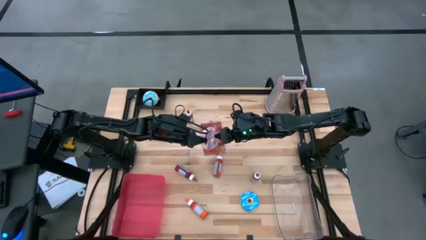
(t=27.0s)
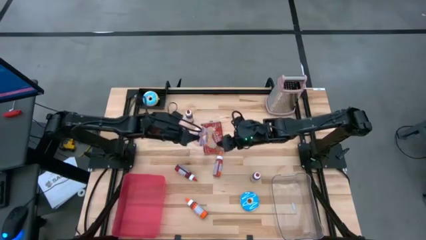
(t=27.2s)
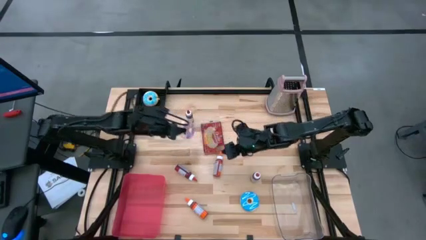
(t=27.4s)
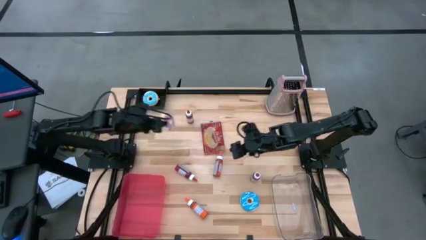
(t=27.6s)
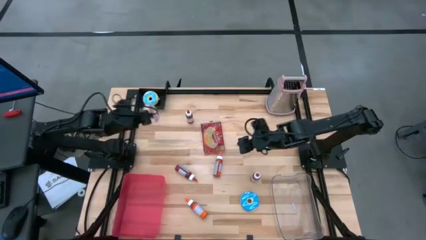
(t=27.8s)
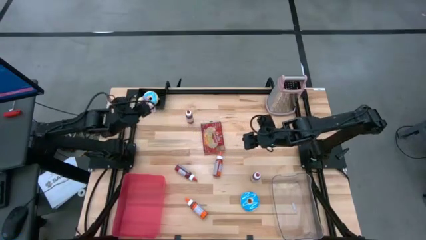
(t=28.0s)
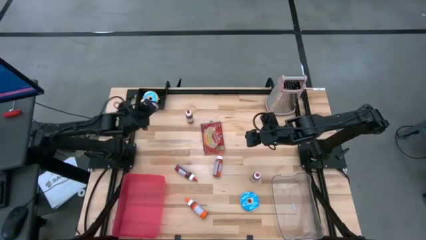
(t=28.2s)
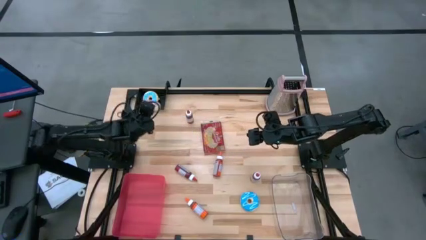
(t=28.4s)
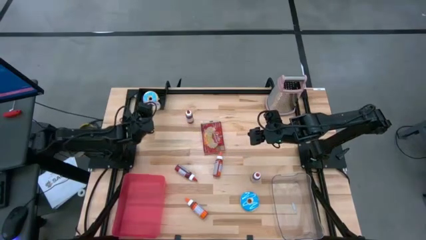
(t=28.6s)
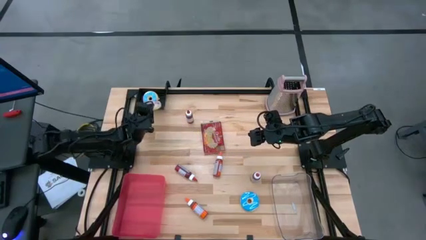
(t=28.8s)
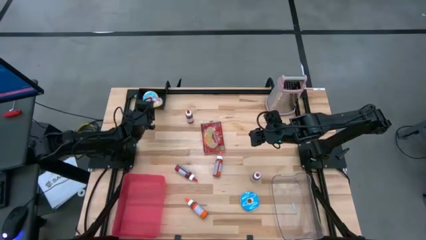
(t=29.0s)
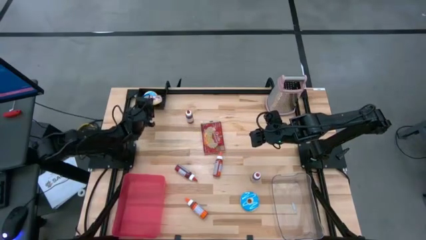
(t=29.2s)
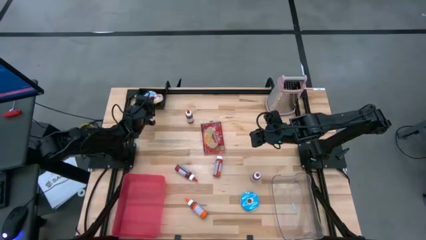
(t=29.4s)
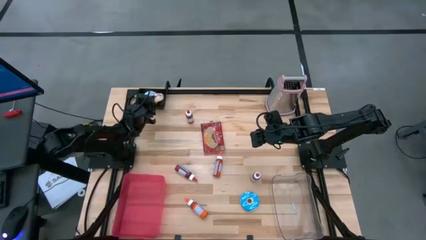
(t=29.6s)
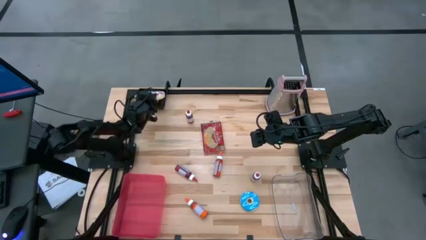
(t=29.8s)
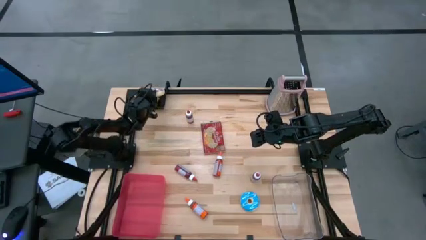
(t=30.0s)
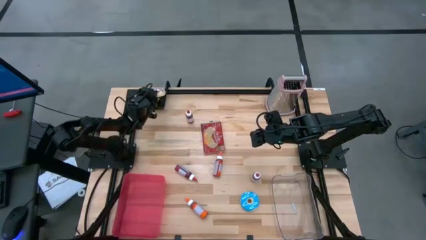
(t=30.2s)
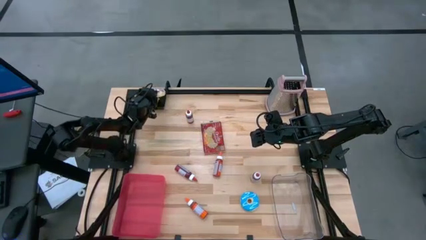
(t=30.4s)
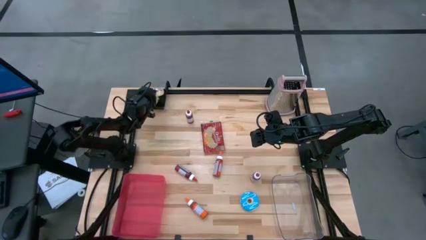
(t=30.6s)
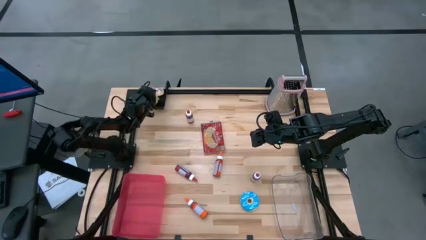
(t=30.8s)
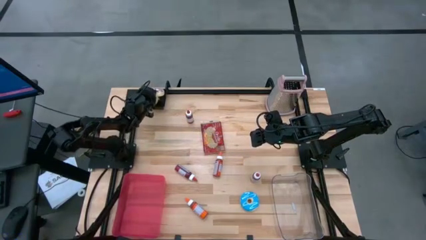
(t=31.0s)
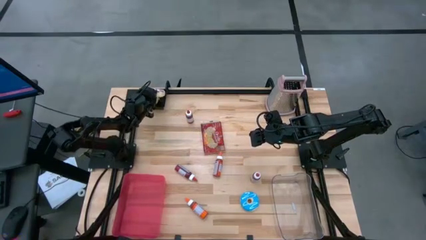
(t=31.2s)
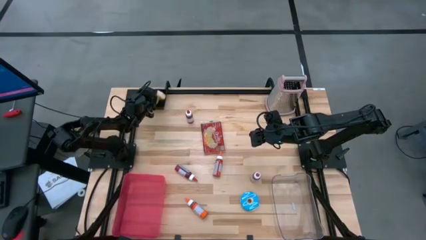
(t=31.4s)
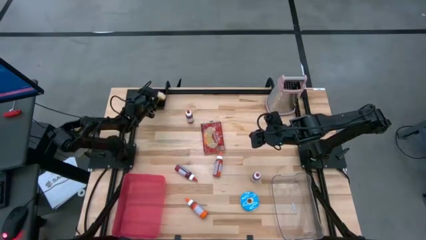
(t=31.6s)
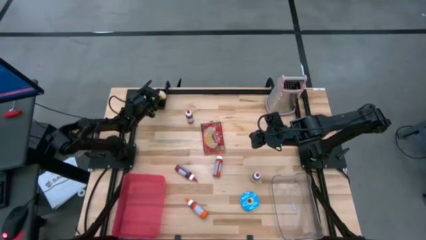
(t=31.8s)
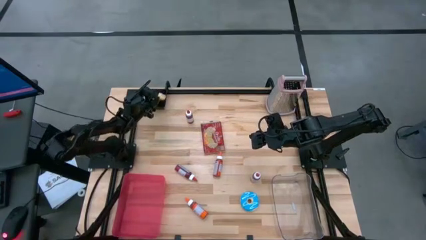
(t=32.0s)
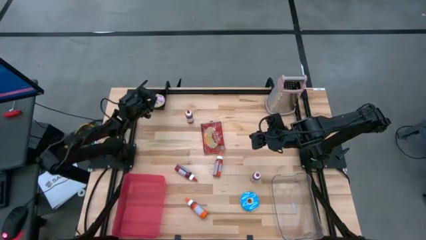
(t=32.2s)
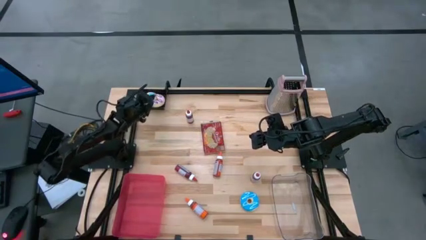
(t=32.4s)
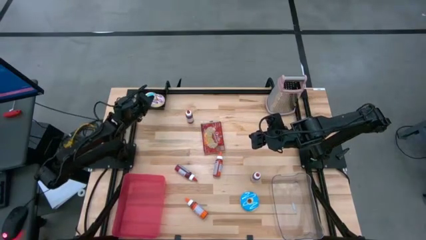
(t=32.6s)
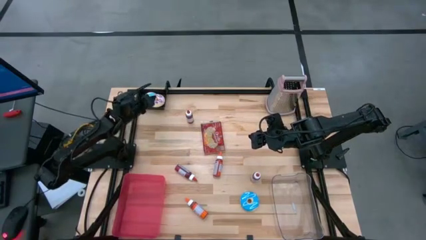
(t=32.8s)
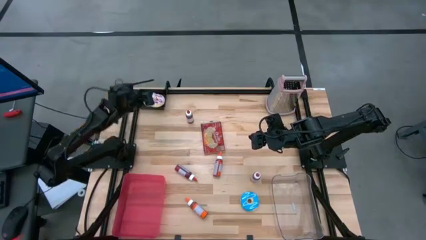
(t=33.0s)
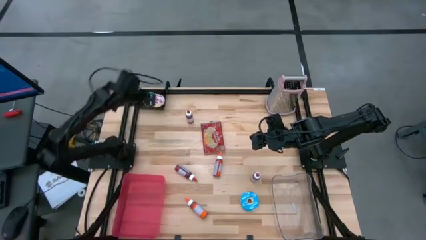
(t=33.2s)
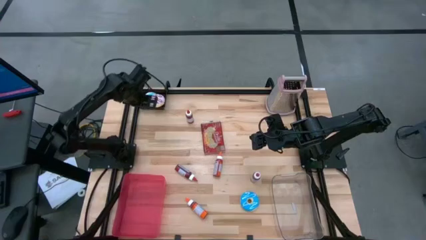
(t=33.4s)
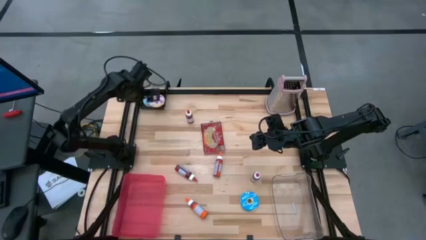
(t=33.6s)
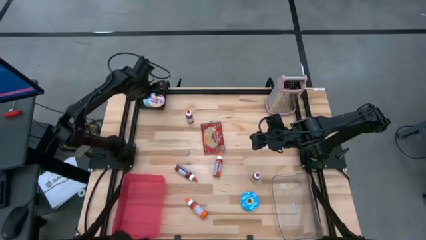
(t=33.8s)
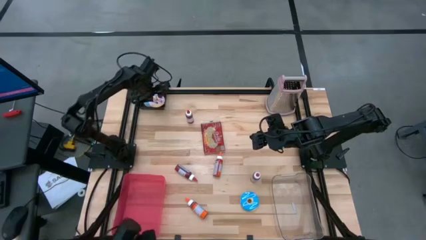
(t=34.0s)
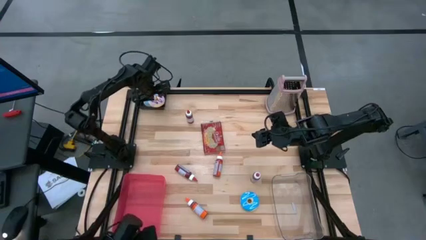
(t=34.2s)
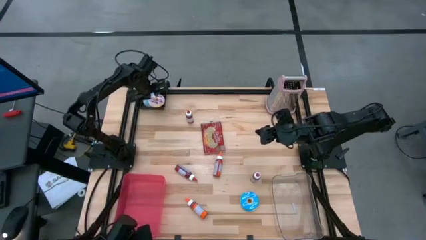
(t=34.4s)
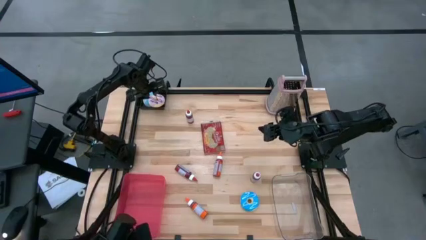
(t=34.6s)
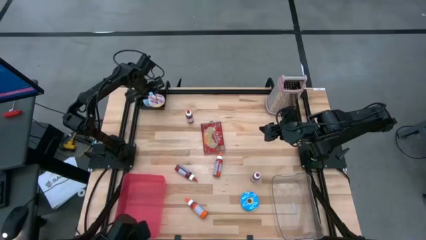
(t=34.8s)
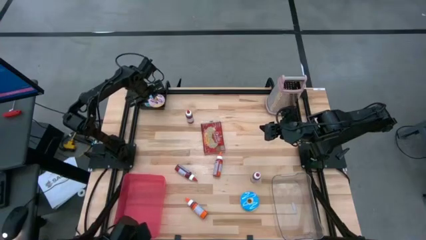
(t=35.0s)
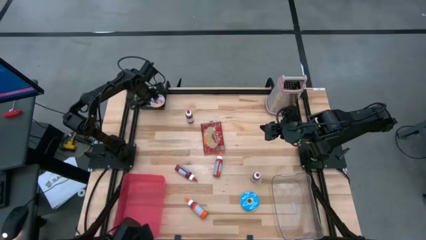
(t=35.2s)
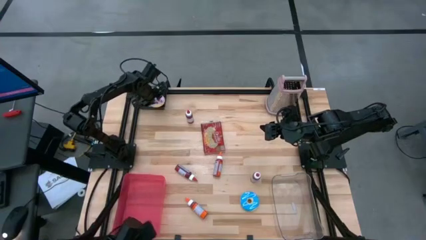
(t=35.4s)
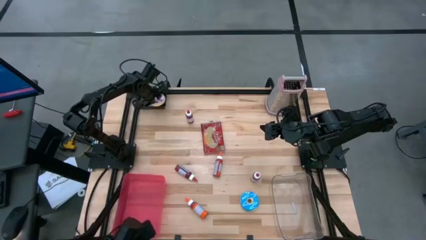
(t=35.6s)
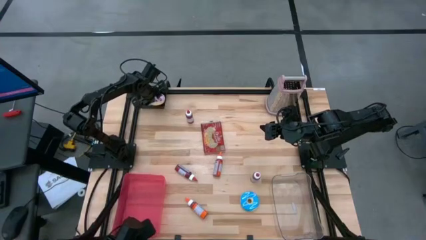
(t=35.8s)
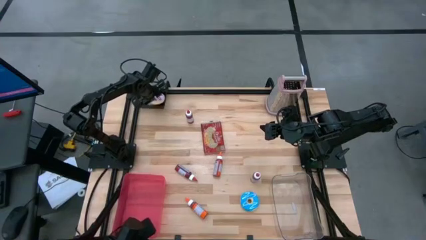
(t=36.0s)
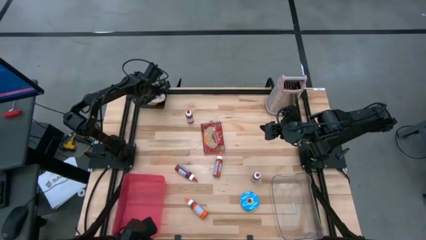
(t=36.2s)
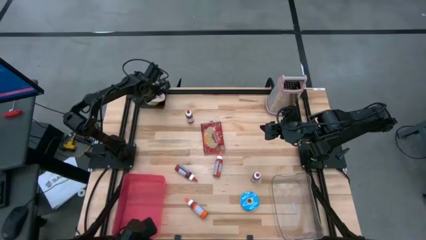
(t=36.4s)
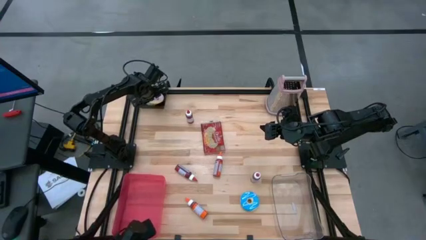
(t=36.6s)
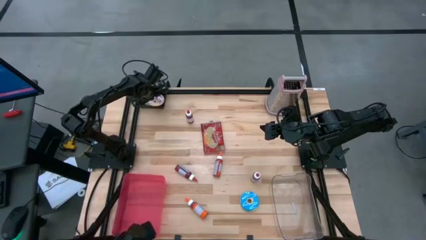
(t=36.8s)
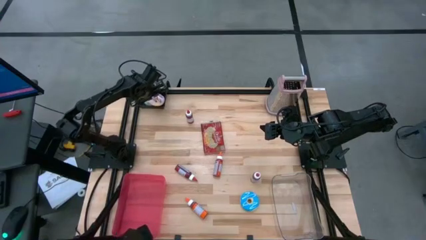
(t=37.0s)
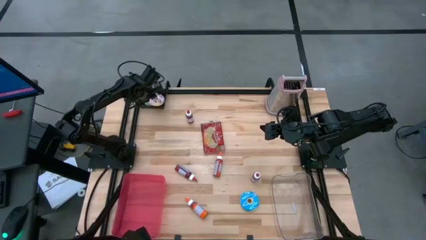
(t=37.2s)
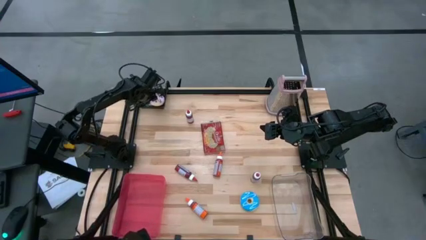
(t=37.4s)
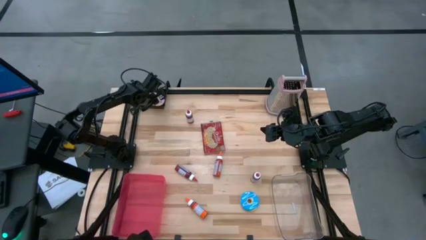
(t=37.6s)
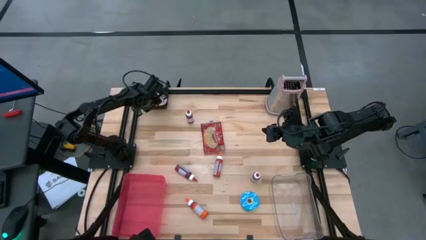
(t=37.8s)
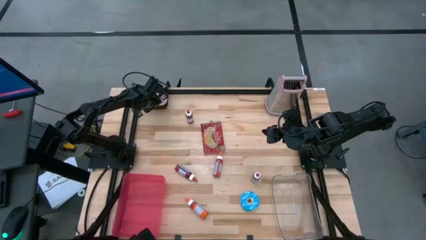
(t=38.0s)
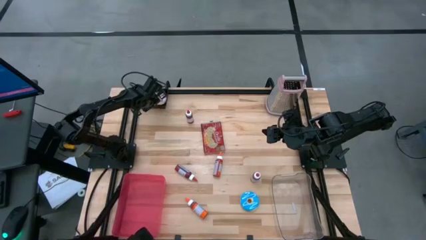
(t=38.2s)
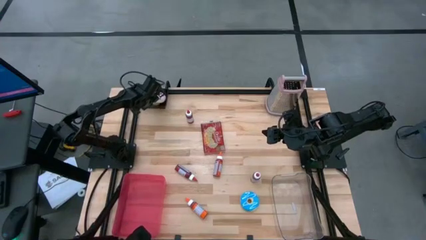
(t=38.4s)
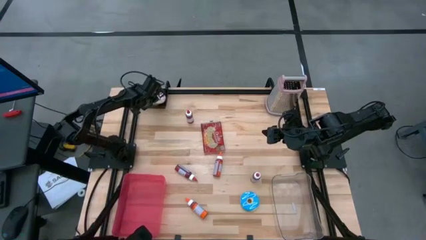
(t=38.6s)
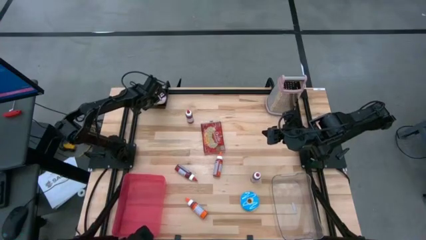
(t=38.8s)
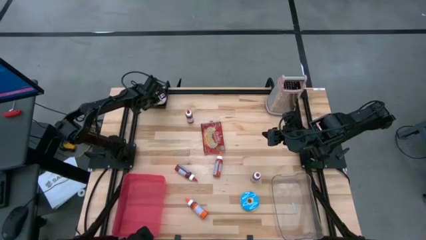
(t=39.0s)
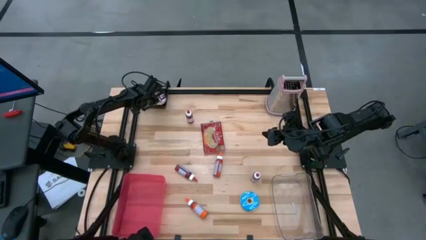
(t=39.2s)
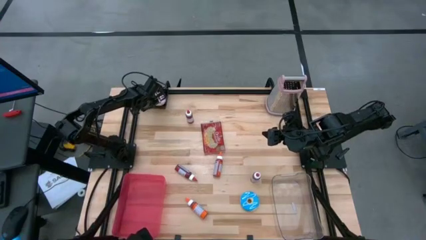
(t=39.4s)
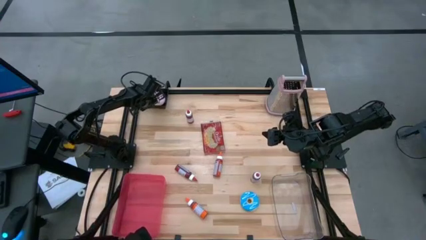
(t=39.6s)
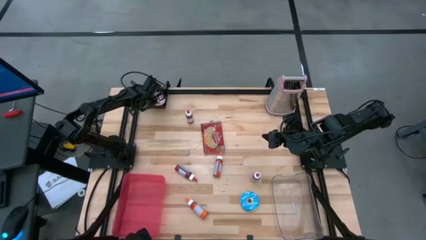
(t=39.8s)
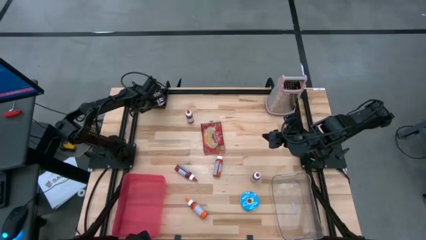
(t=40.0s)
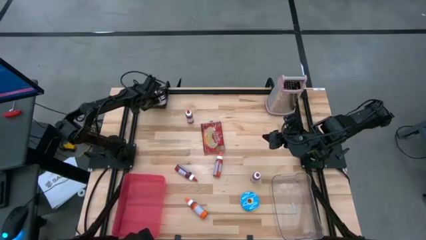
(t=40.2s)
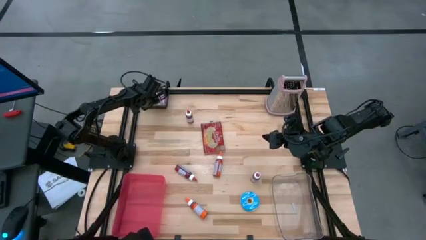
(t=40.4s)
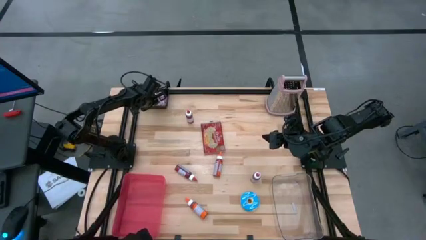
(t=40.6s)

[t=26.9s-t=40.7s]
Put the purple donut into the black bin
